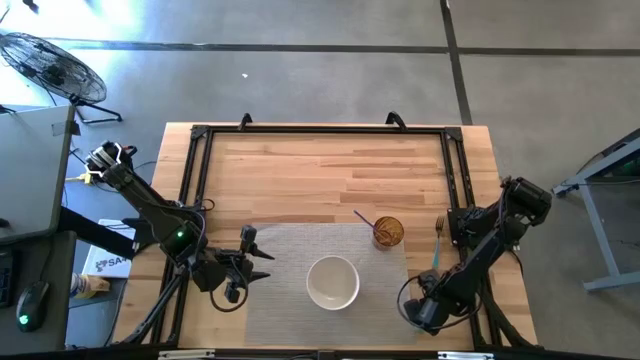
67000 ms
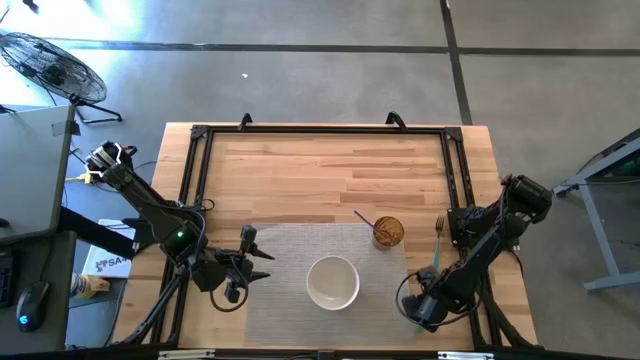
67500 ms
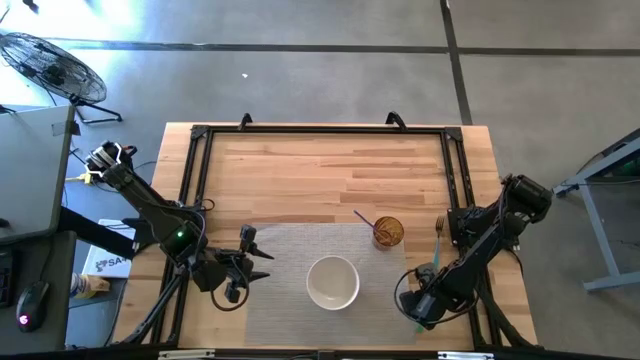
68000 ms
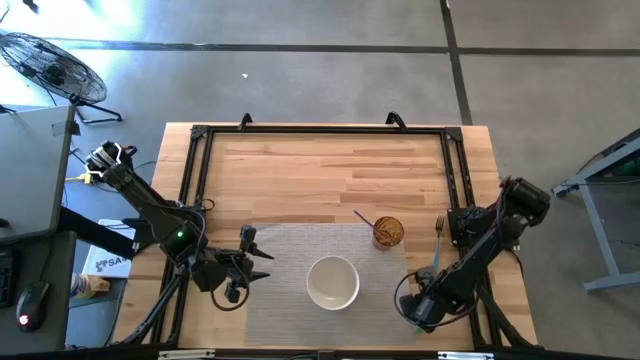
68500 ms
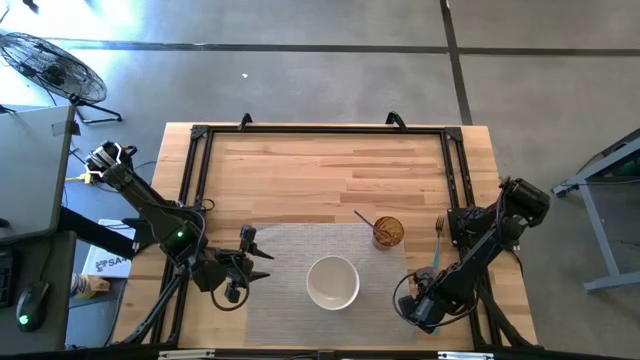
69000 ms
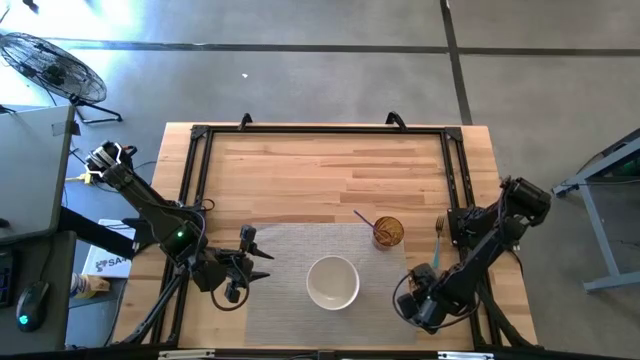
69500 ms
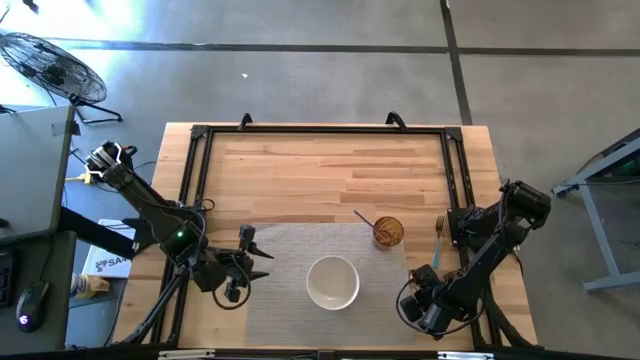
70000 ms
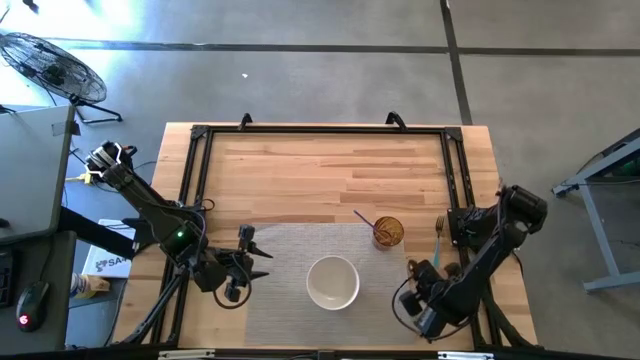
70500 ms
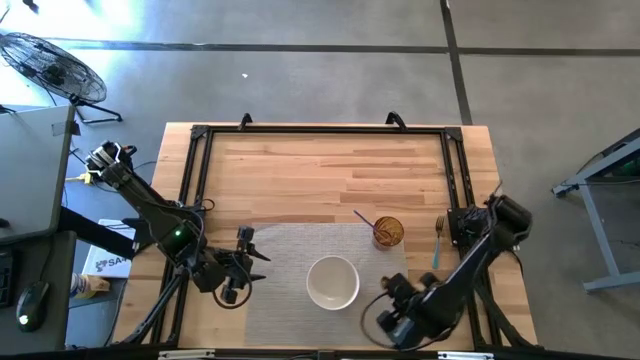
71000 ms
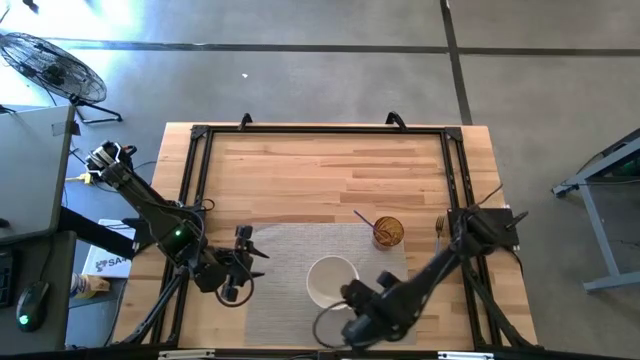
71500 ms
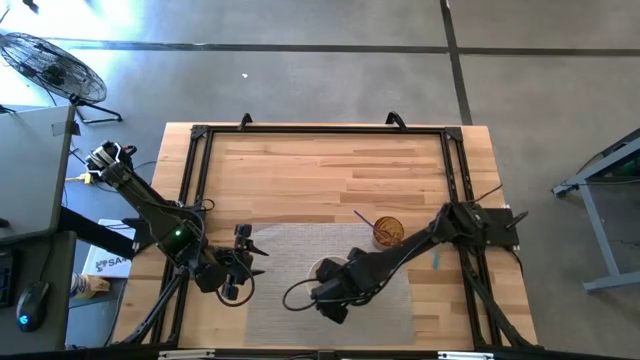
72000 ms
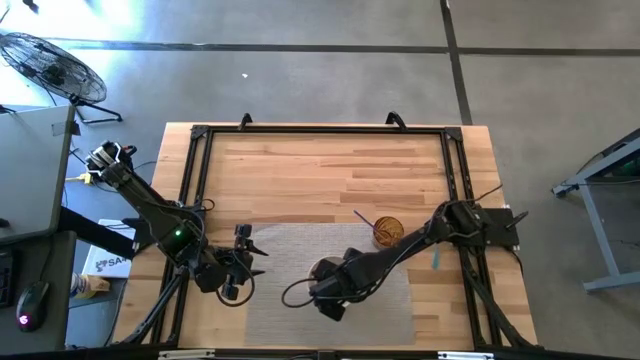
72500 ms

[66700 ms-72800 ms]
Task: Pick & Place Utensil
Put the green spoon into the white bowl

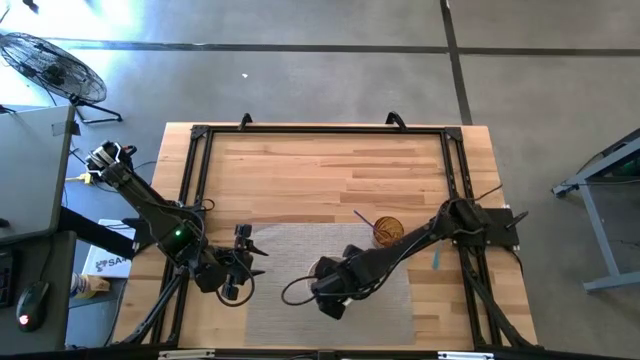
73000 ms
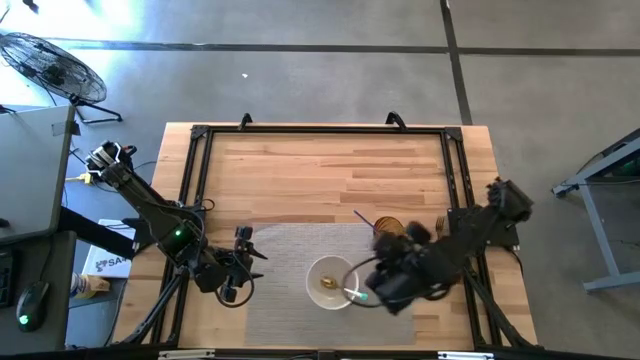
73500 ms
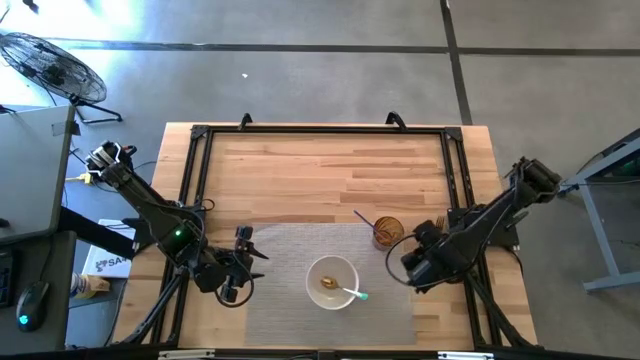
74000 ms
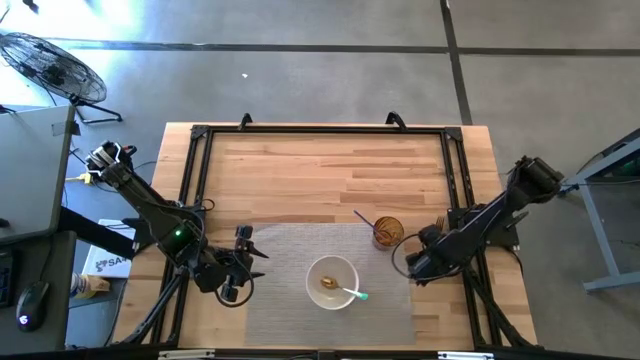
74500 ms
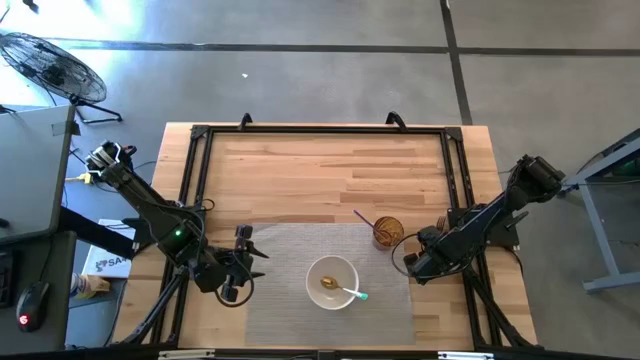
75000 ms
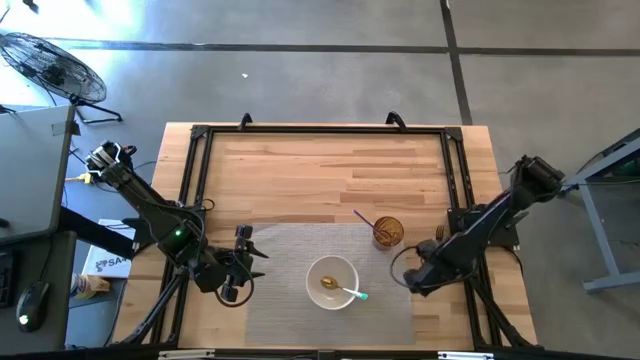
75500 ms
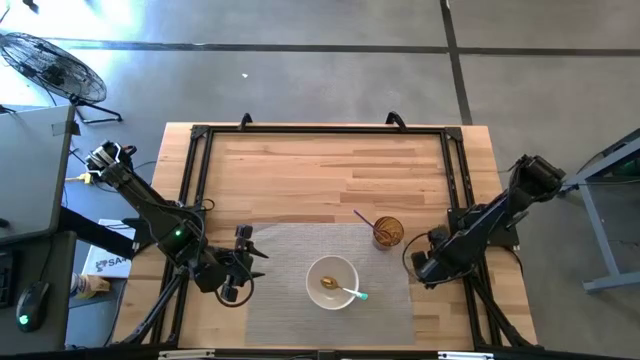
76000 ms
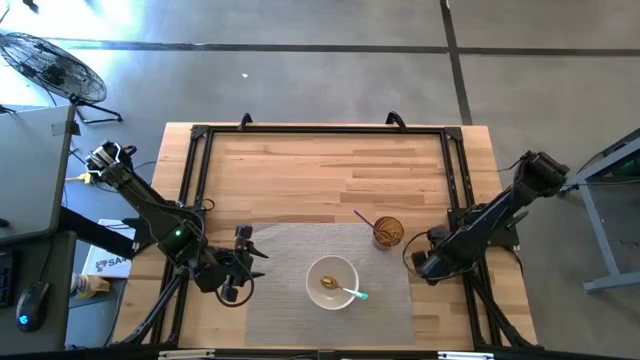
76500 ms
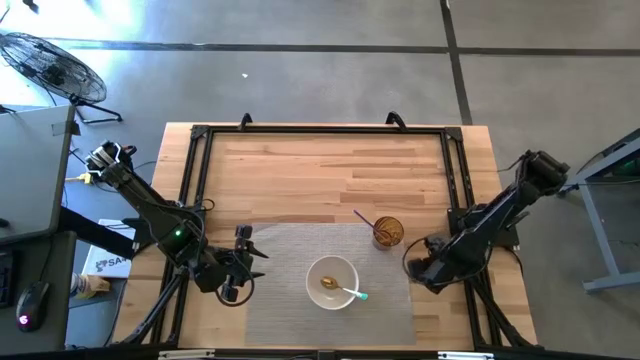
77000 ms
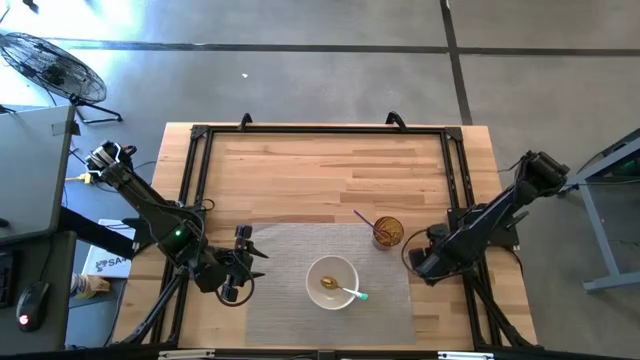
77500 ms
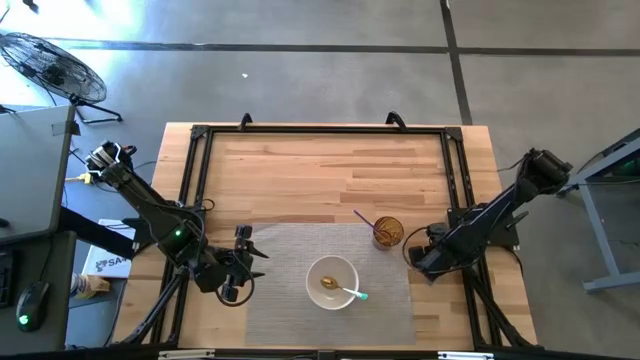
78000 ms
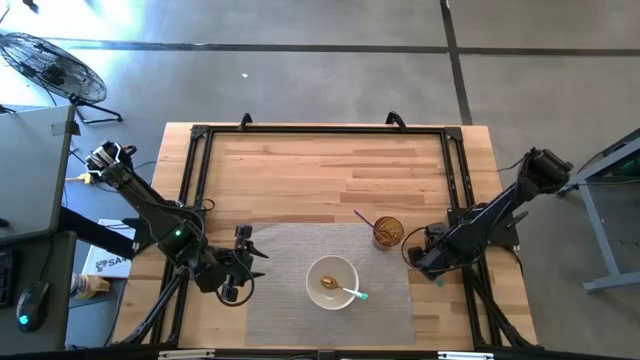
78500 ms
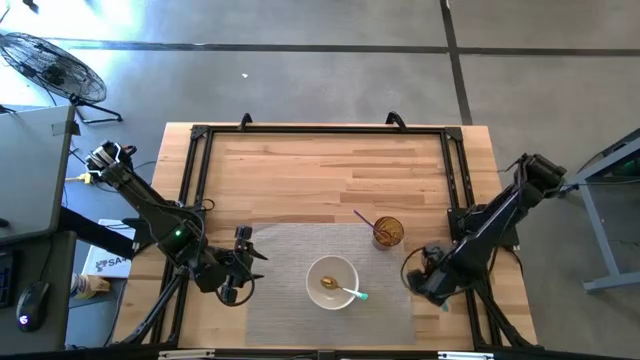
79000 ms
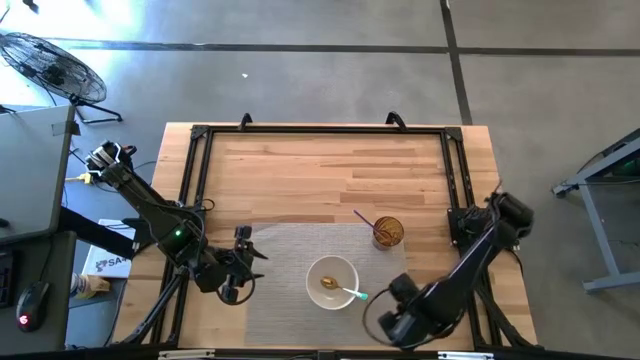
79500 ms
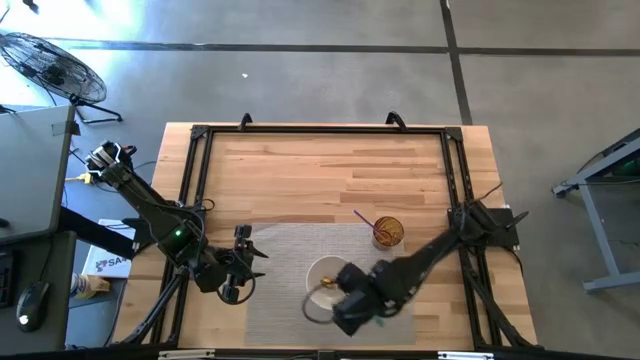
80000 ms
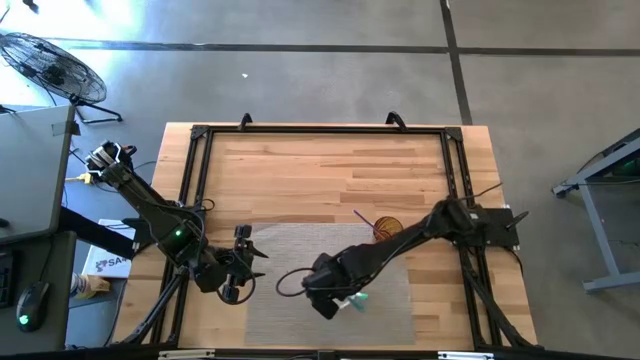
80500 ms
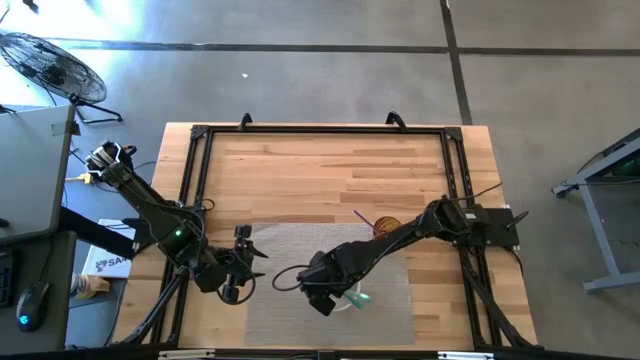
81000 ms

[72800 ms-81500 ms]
Put the blue fork into the white bowl

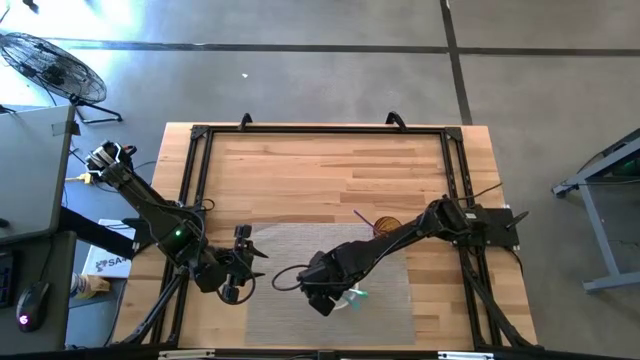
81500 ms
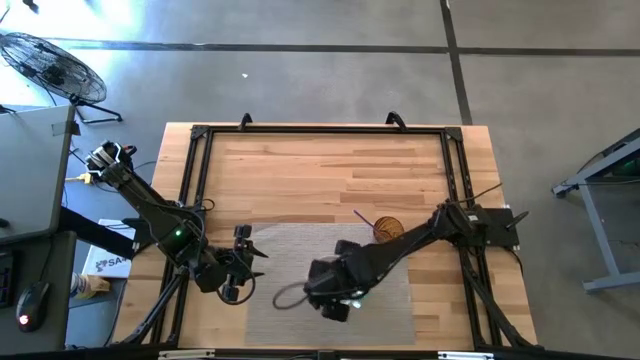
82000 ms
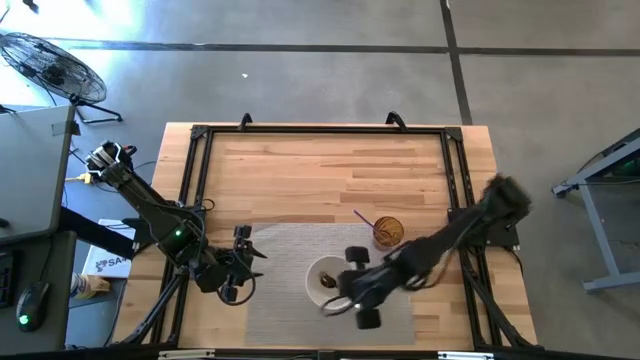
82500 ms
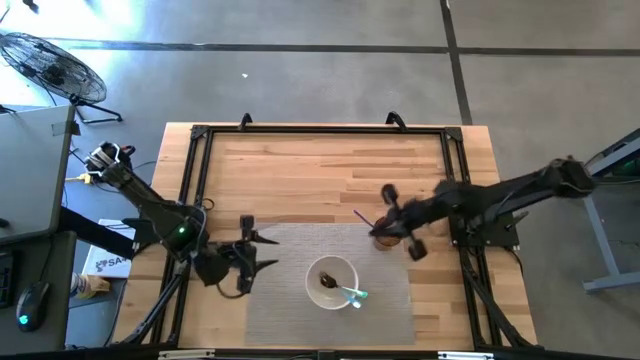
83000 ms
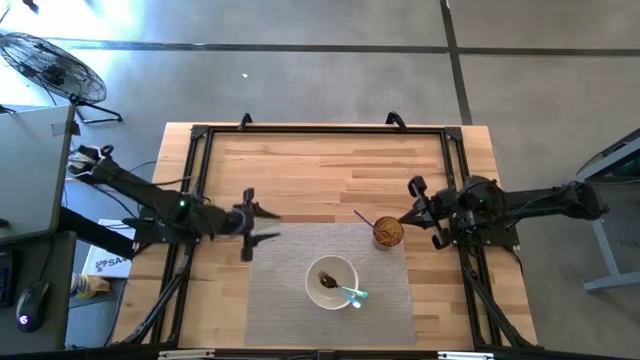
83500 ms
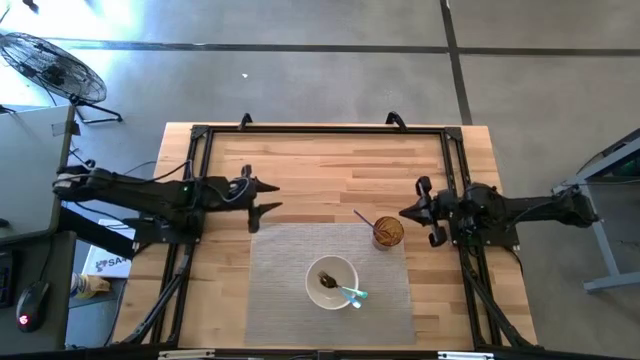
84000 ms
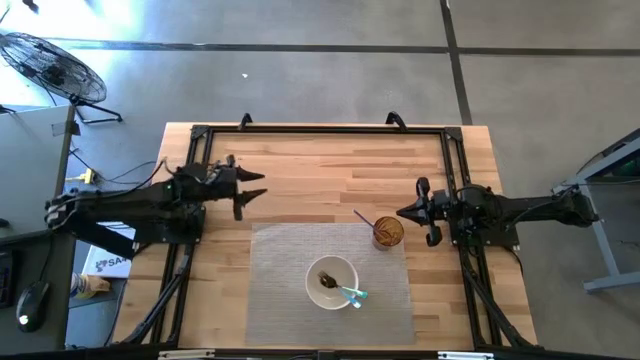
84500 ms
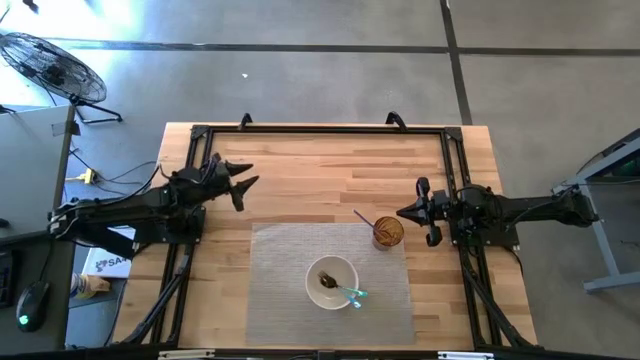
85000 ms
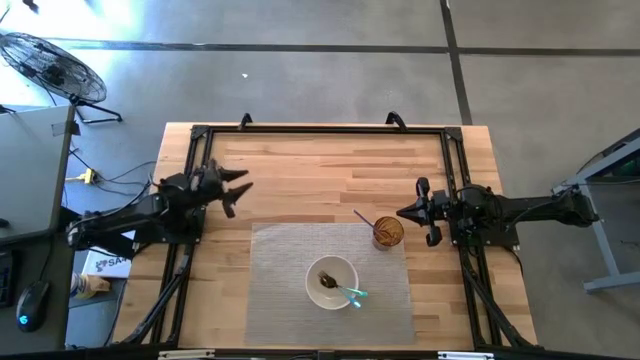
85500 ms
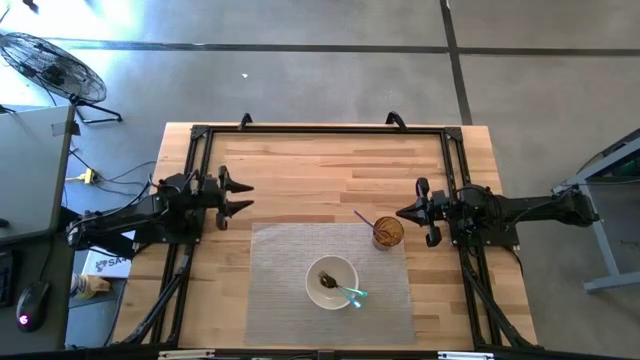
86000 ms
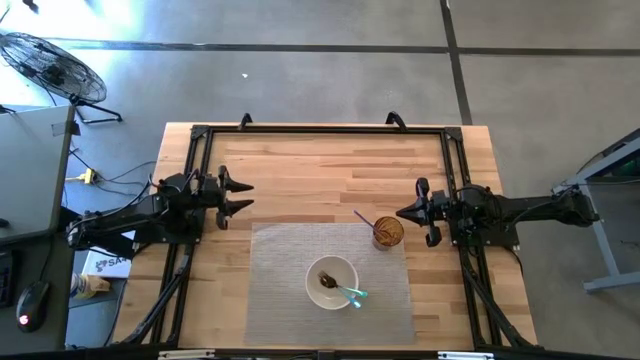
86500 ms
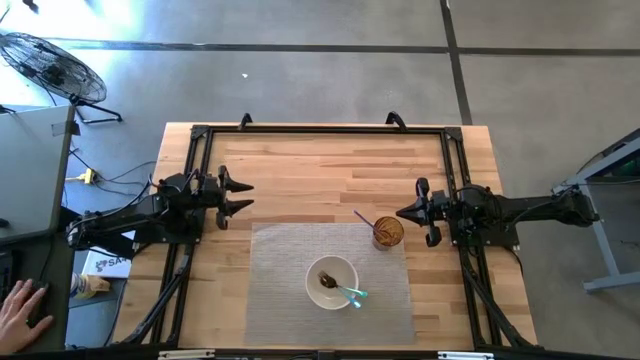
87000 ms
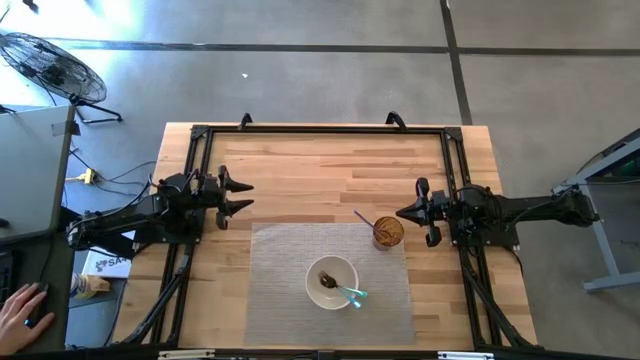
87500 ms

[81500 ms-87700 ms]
Return to Home Position
